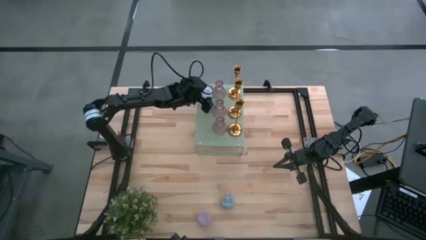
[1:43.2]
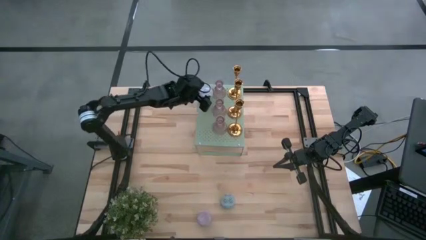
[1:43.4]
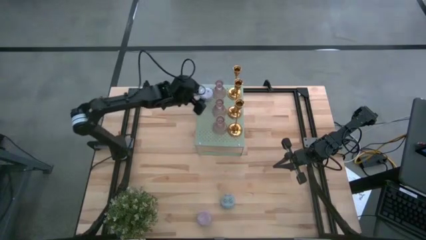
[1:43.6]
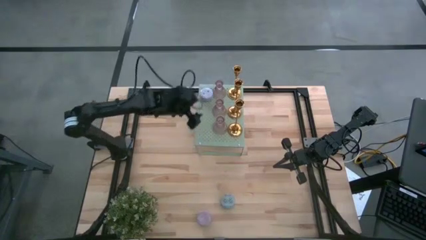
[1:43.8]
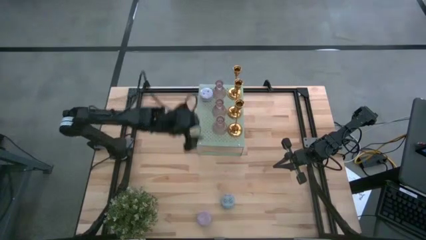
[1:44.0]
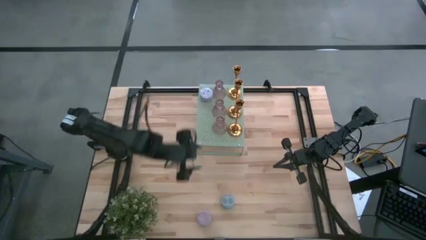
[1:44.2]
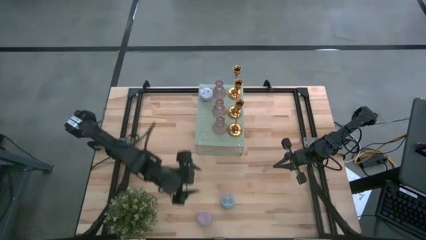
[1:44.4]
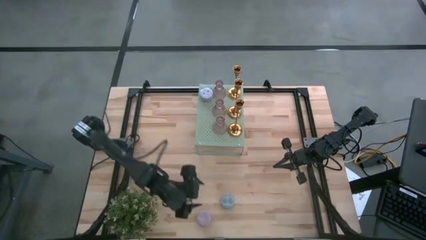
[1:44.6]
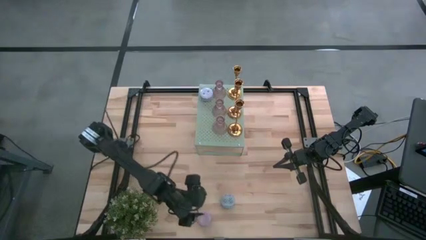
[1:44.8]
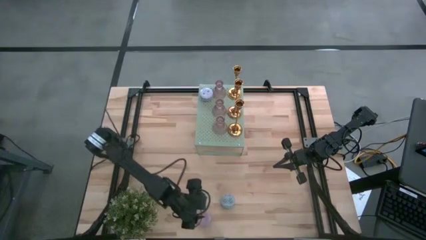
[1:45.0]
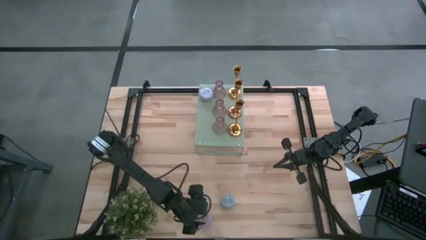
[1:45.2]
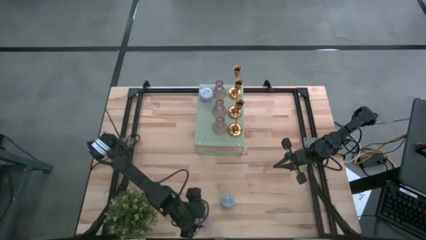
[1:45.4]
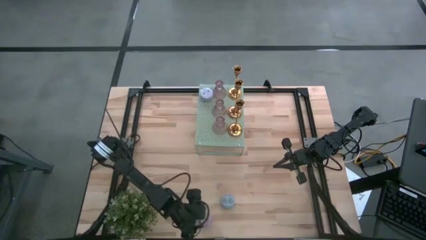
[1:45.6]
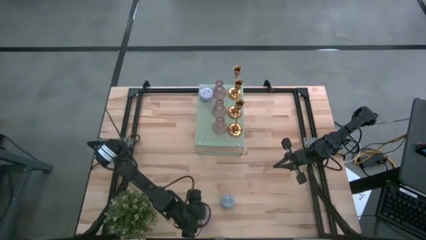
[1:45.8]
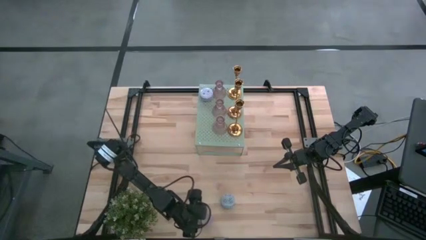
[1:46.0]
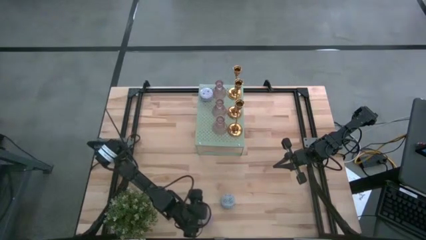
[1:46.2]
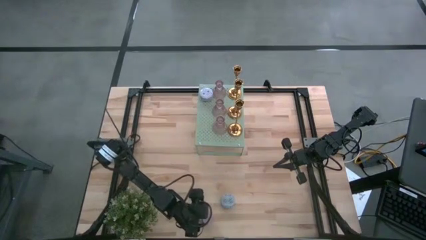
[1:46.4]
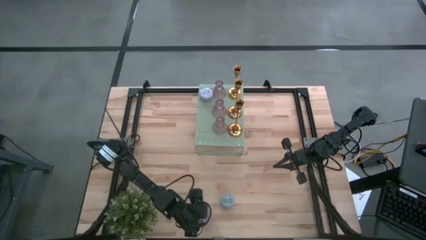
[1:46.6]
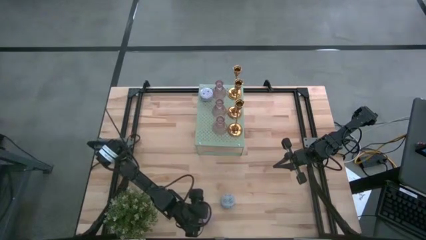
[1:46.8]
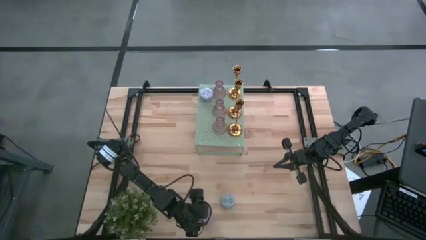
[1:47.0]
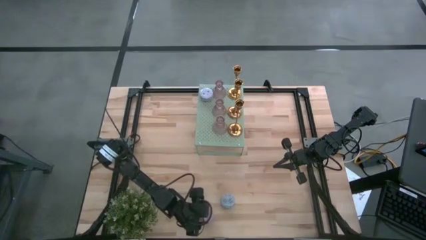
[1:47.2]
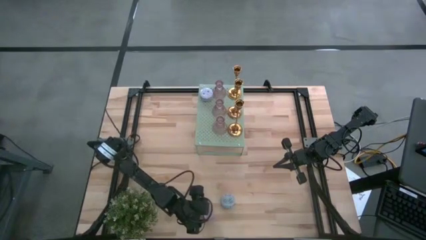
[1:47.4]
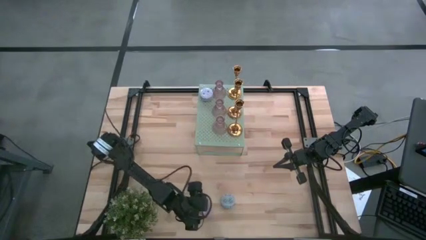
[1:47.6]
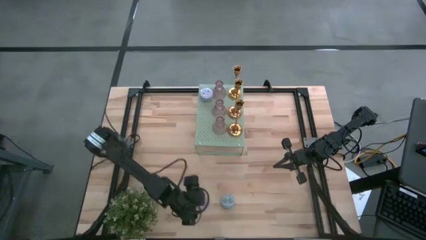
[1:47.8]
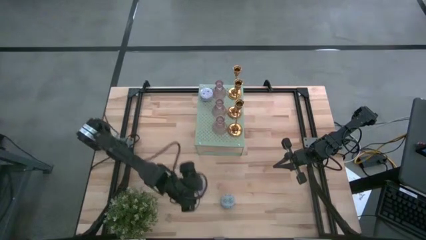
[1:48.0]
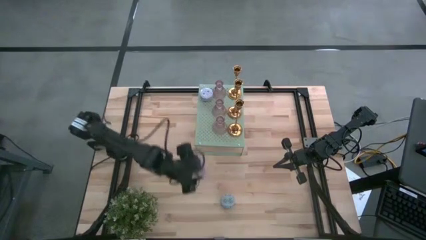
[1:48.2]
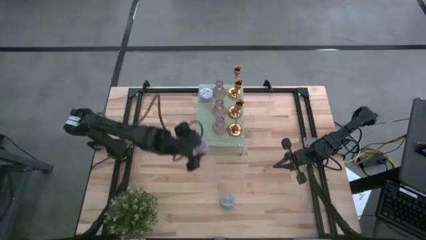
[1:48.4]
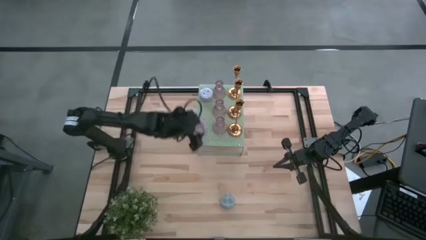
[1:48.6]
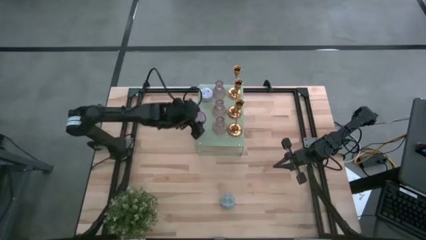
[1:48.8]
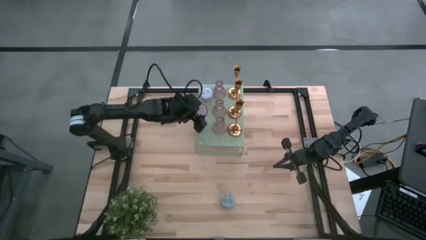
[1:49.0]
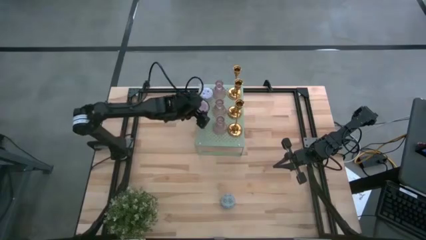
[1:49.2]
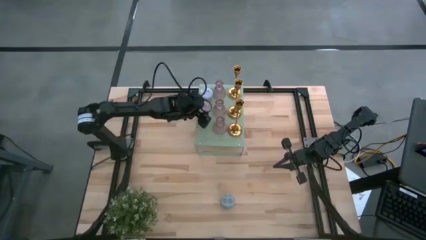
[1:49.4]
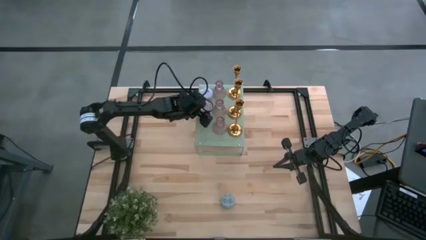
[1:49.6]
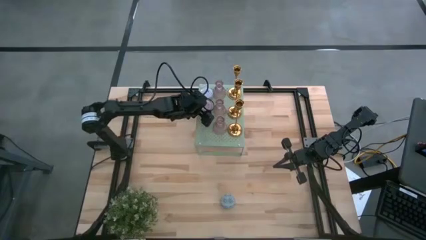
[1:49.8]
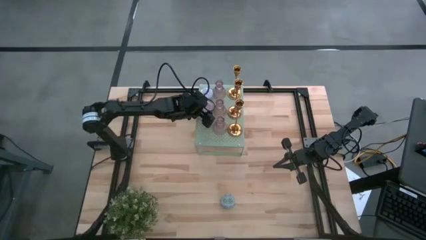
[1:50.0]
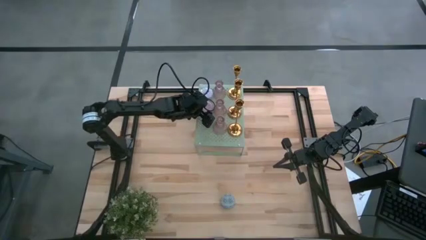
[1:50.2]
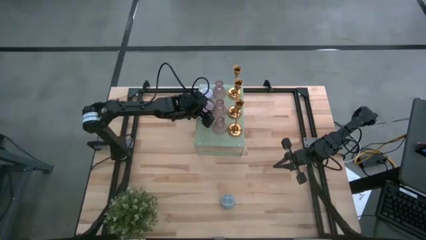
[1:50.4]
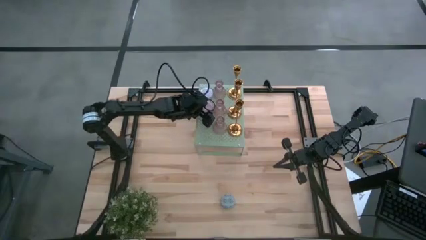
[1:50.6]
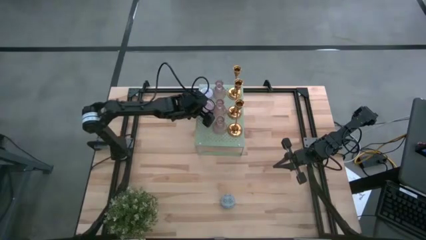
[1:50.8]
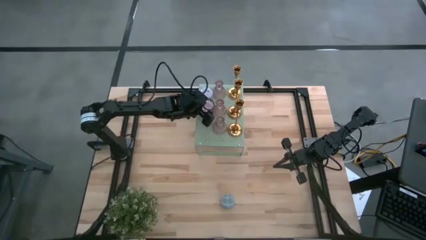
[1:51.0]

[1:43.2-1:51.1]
Task: Pick & Place candle stick holders
Put the purple scented candle on the shelf align with other scented candle

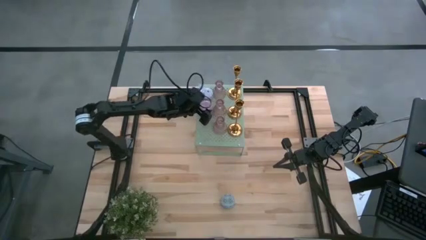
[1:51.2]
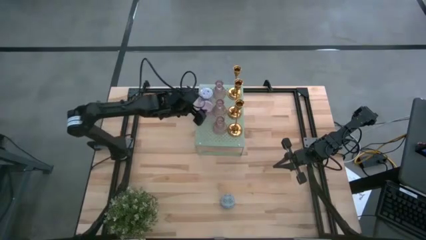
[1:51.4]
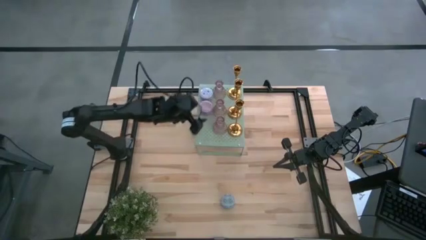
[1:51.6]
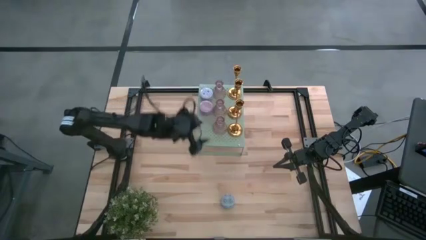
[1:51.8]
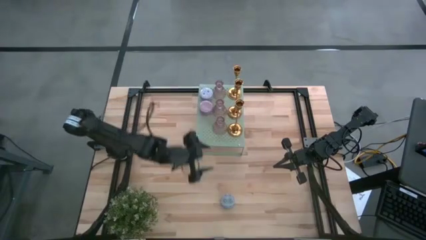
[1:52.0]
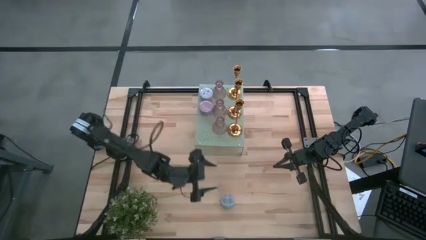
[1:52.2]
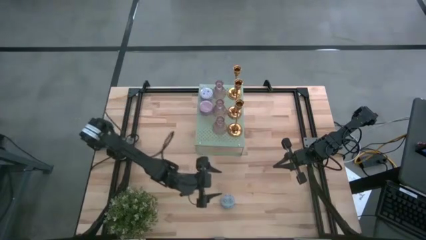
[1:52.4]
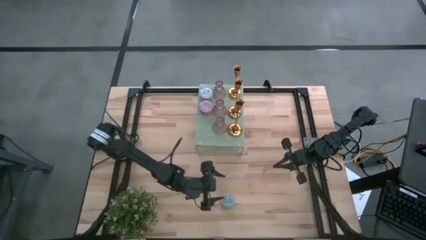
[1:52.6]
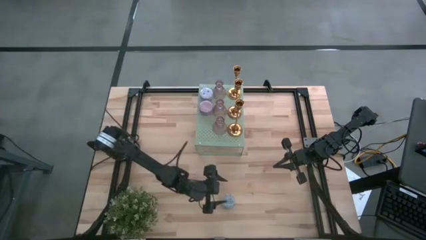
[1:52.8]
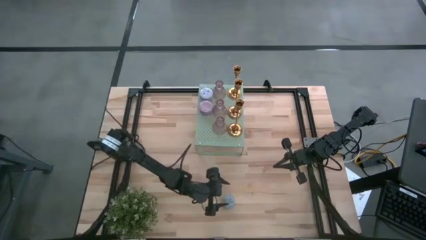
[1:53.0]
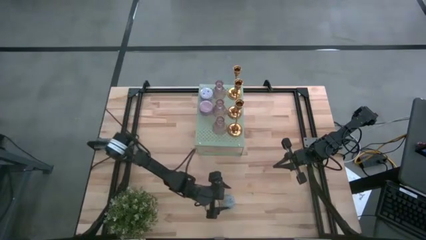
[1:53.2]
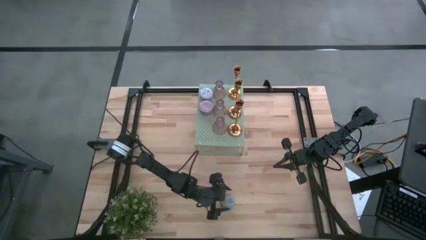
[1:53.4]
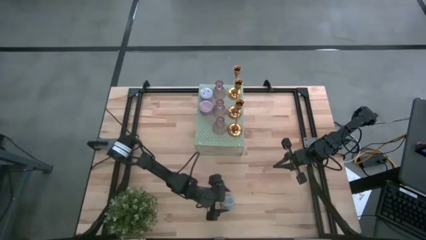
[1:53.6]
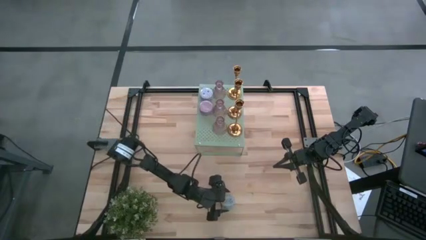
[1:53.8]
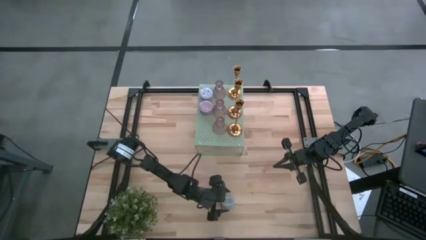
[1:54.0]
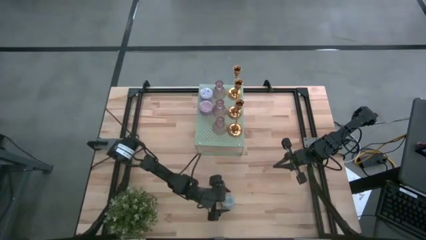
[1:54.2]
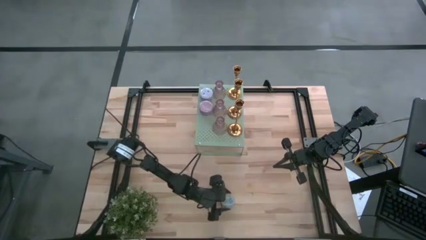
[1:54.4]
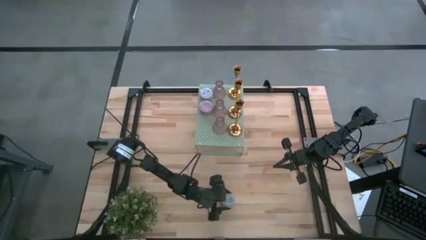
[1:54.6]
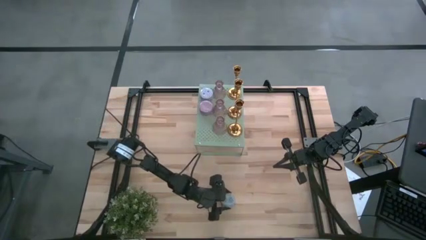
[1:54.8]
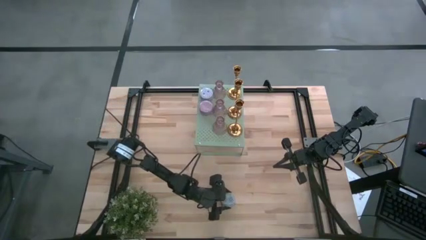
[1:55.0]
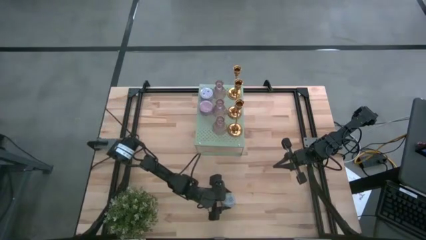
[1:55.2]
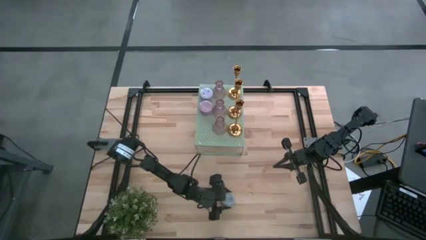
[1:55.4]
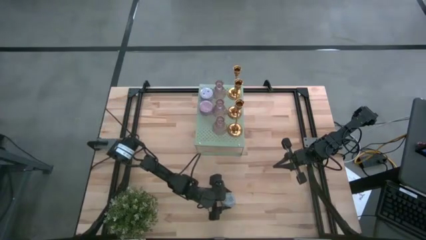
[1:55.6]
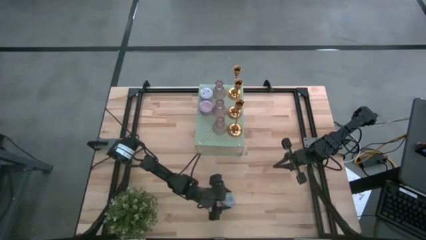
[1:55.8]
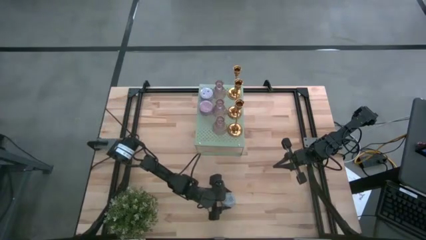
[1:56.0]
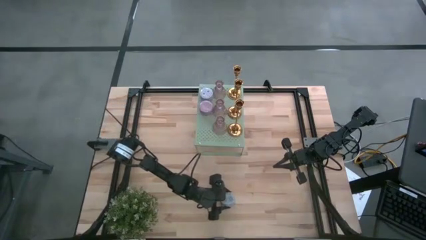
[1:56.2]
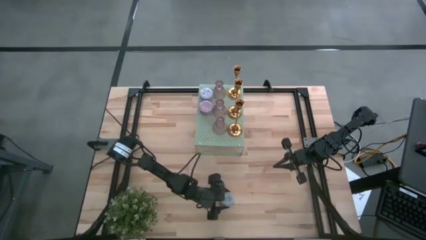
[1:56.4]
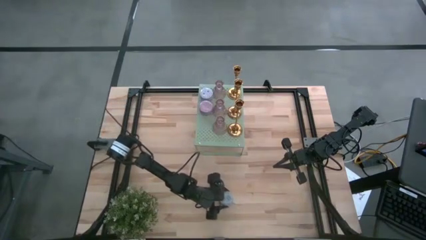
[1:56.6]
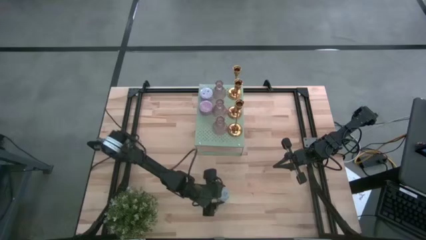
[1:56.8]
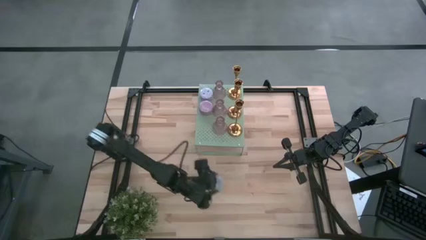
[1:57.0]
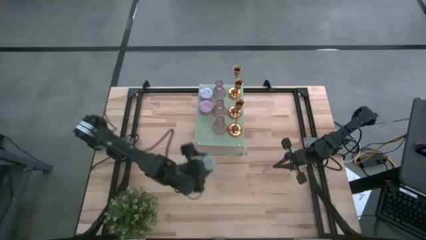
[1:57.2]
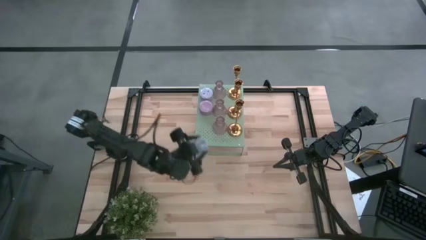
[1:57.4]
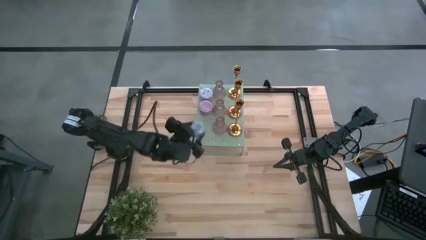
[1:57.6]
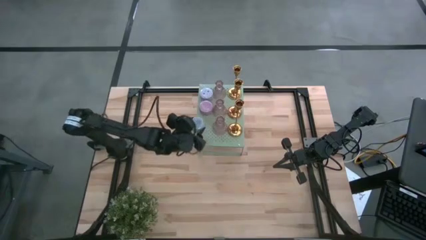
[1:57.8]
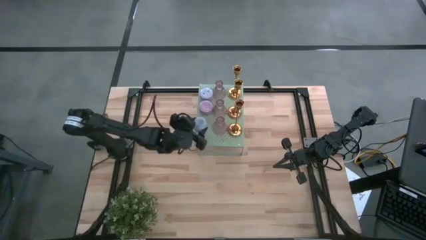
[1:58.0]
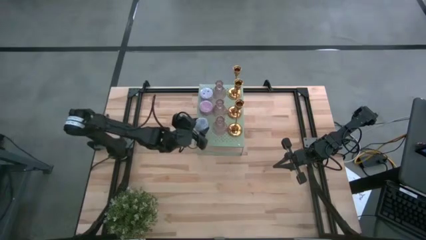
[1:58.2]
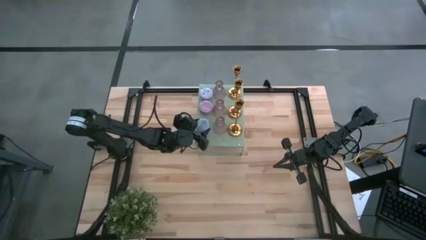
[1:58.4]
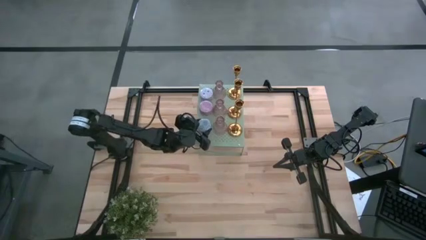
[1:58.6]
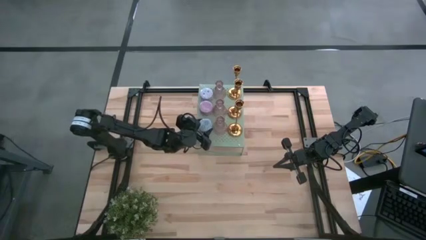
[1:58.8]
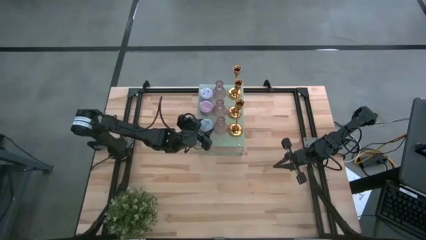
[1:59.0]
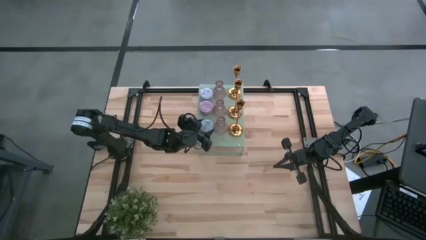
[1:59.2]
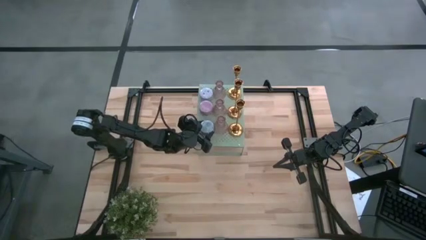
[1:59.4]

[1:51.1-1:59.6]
Put the blue scented candle on the shelf align with other scented candles
